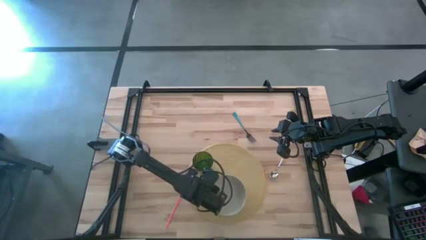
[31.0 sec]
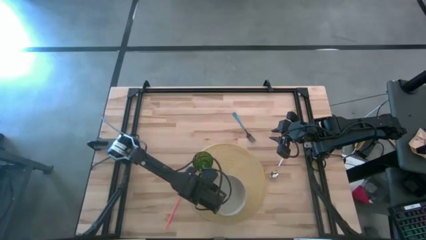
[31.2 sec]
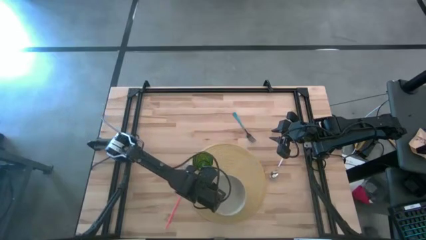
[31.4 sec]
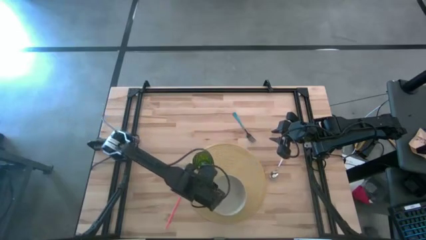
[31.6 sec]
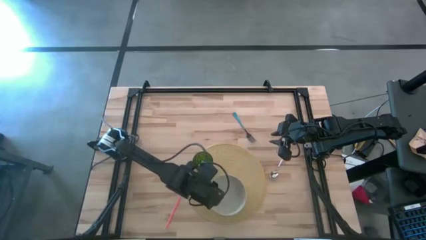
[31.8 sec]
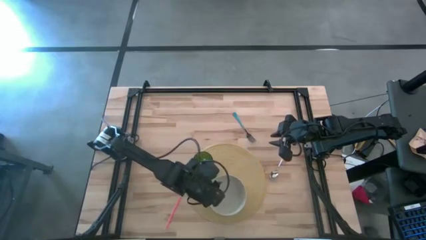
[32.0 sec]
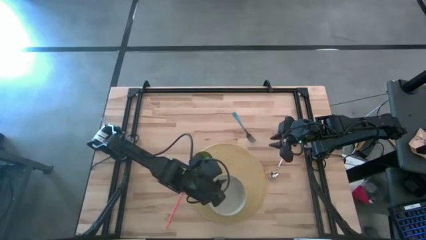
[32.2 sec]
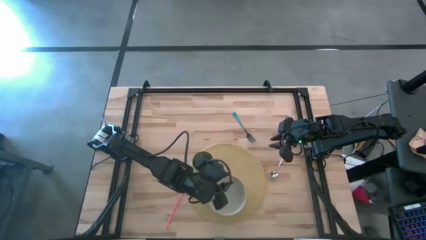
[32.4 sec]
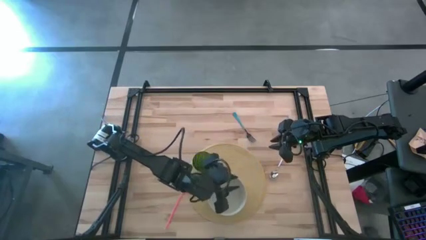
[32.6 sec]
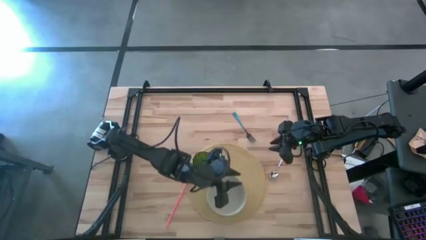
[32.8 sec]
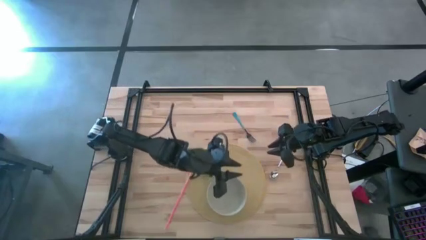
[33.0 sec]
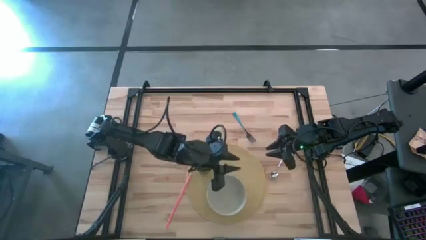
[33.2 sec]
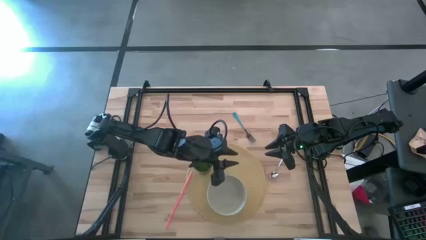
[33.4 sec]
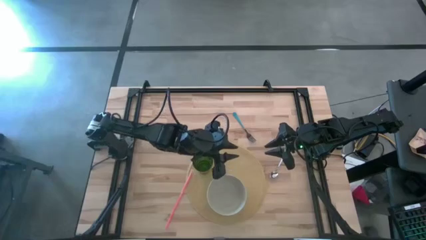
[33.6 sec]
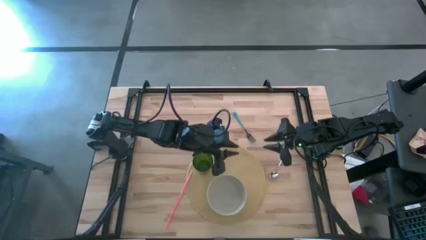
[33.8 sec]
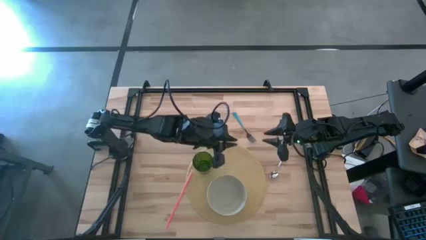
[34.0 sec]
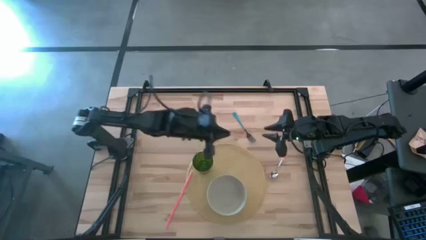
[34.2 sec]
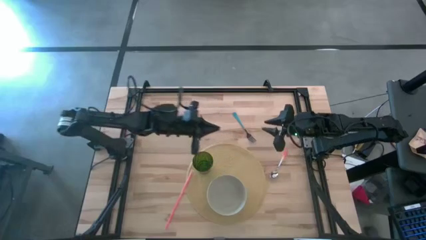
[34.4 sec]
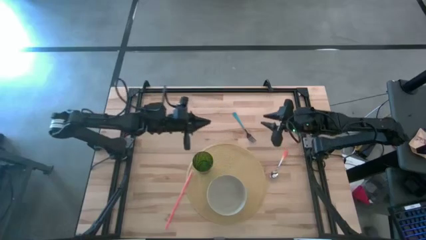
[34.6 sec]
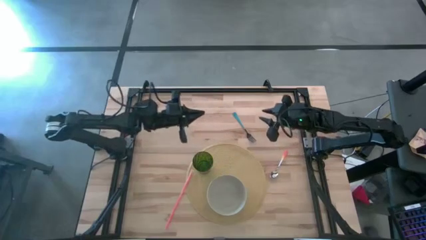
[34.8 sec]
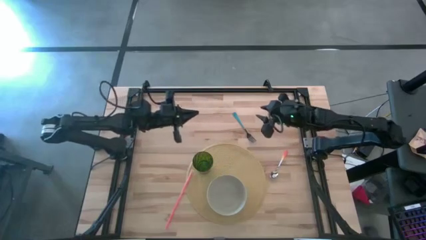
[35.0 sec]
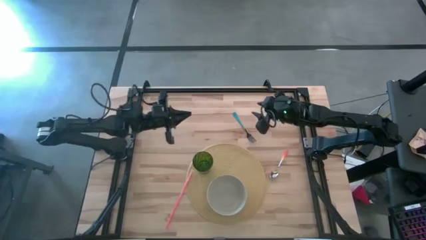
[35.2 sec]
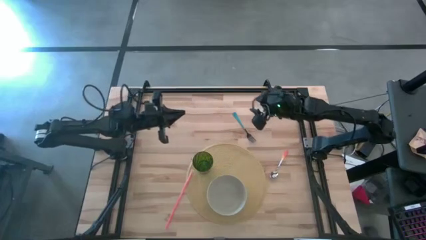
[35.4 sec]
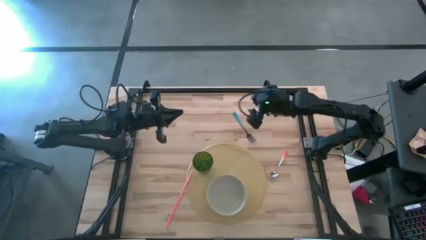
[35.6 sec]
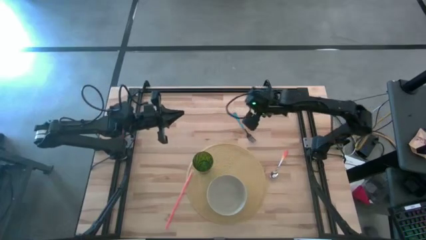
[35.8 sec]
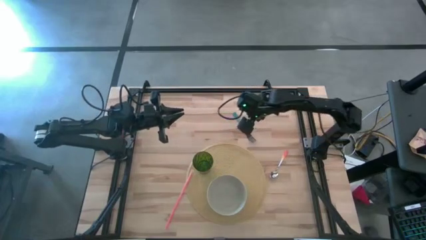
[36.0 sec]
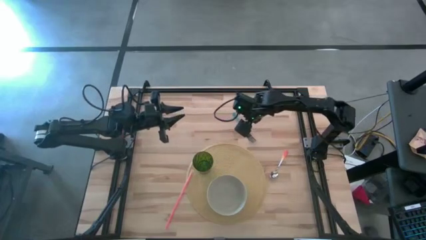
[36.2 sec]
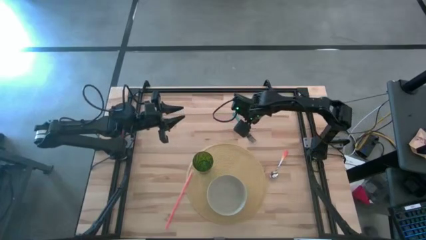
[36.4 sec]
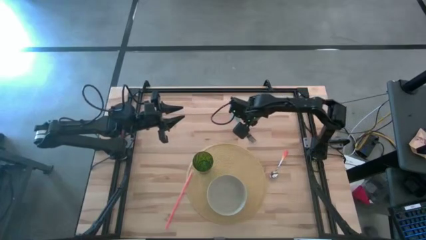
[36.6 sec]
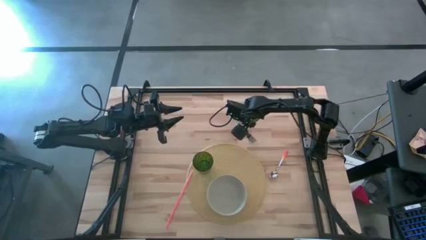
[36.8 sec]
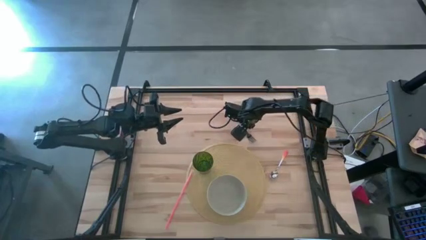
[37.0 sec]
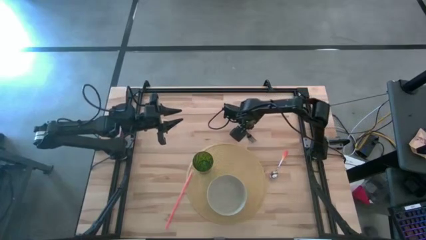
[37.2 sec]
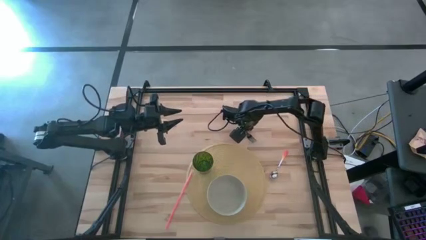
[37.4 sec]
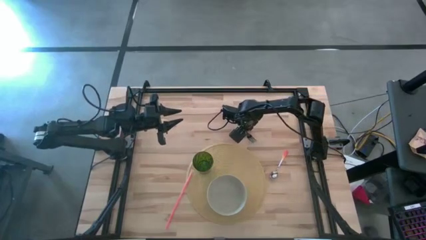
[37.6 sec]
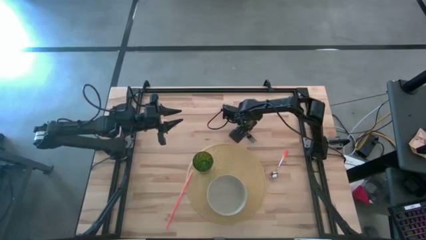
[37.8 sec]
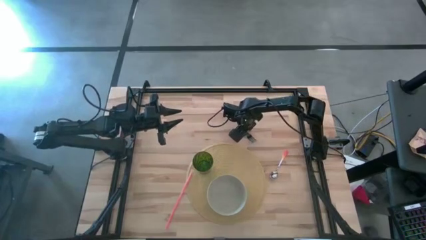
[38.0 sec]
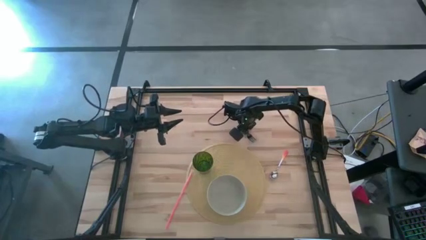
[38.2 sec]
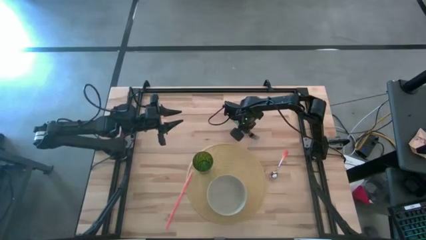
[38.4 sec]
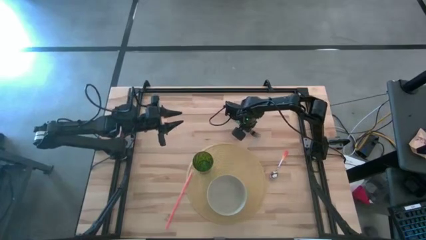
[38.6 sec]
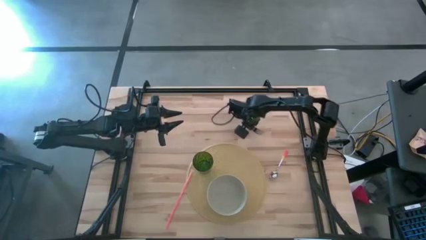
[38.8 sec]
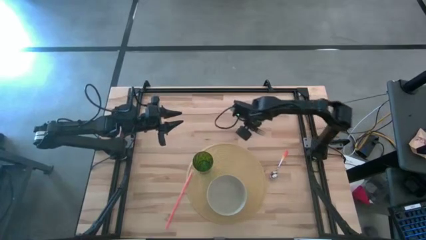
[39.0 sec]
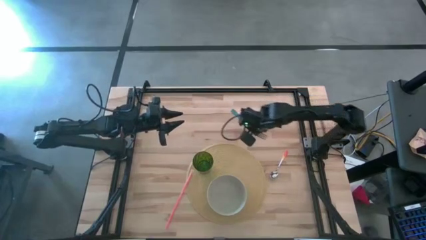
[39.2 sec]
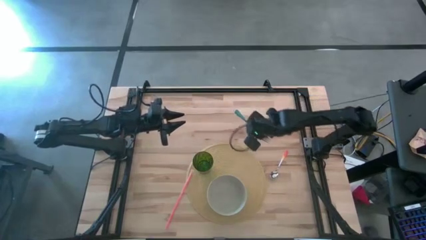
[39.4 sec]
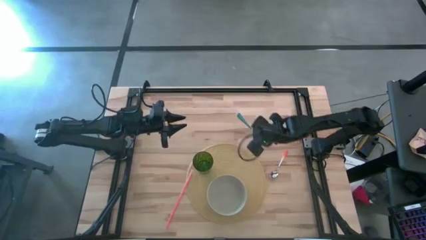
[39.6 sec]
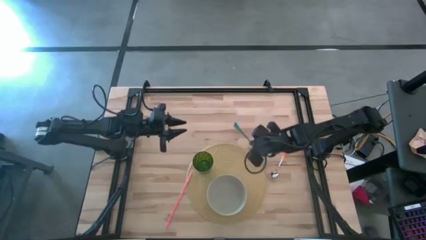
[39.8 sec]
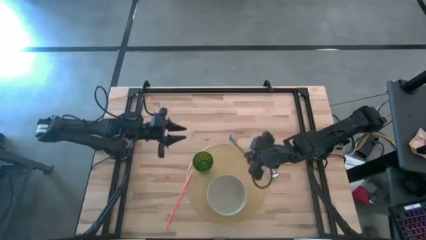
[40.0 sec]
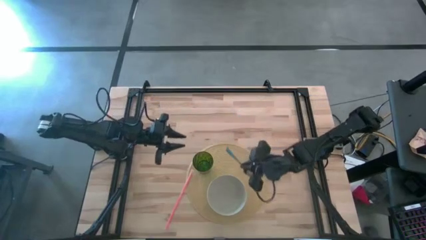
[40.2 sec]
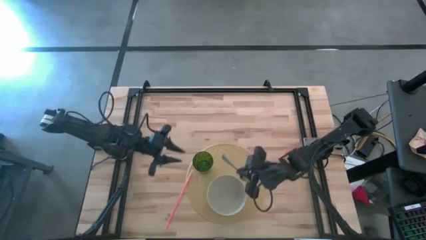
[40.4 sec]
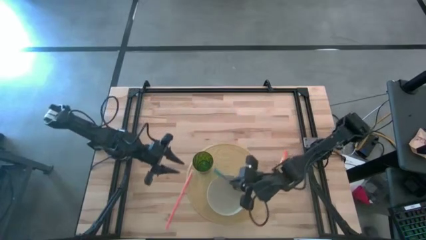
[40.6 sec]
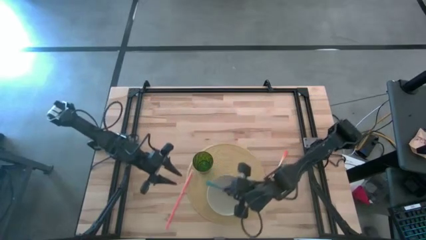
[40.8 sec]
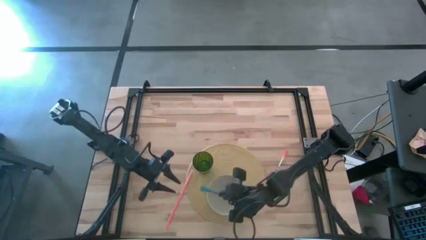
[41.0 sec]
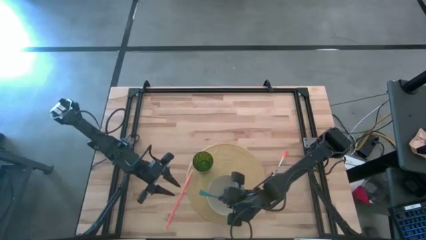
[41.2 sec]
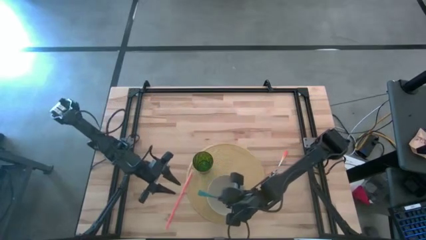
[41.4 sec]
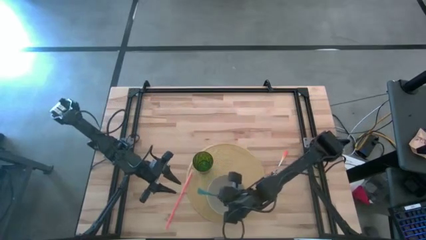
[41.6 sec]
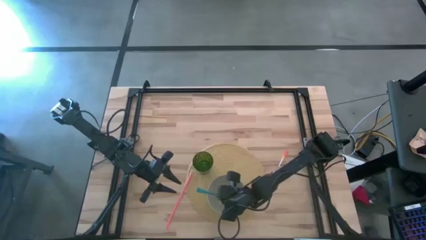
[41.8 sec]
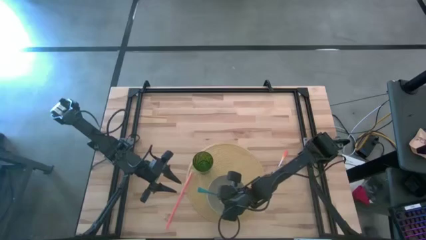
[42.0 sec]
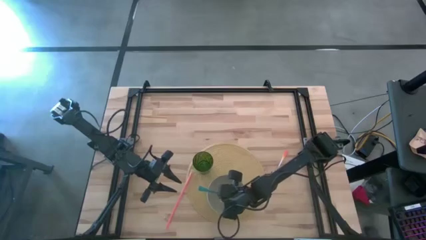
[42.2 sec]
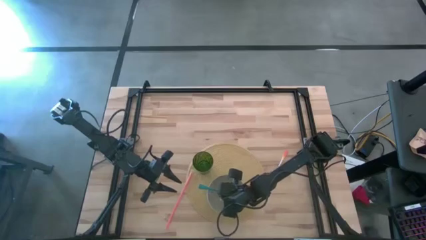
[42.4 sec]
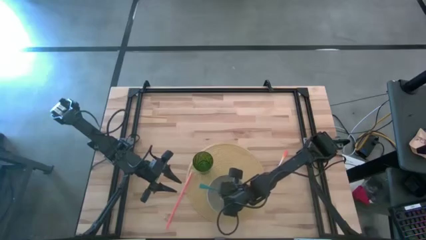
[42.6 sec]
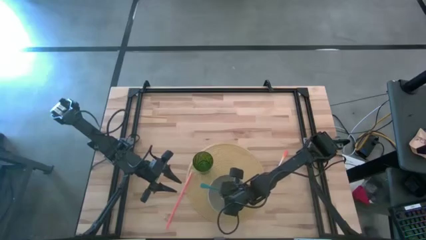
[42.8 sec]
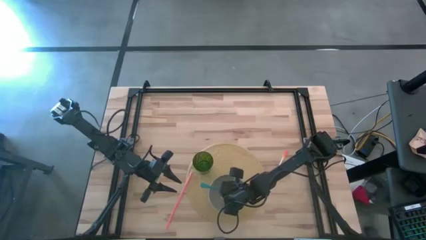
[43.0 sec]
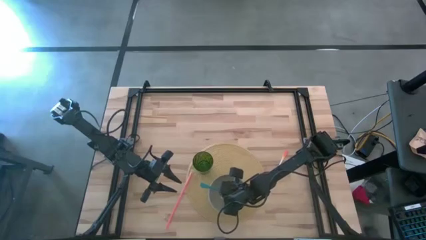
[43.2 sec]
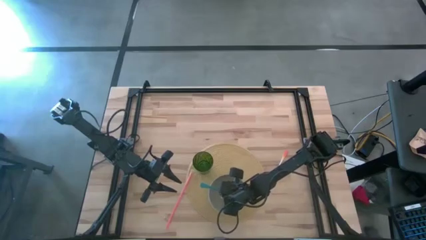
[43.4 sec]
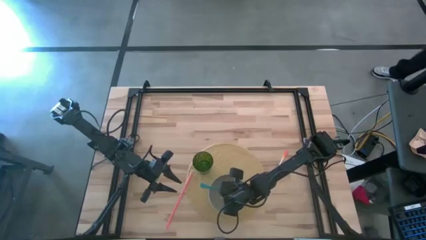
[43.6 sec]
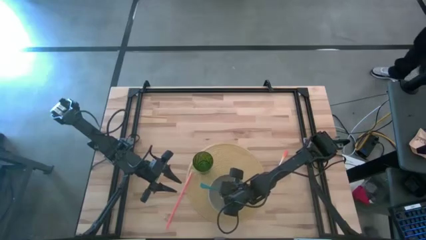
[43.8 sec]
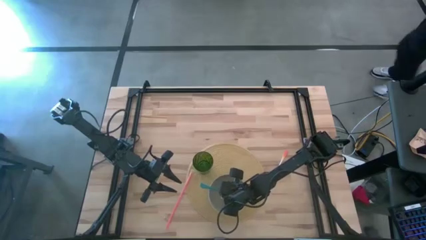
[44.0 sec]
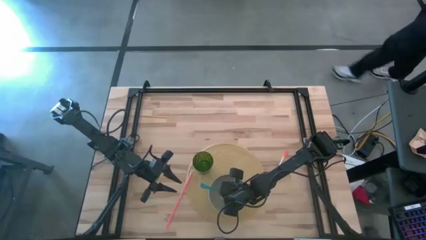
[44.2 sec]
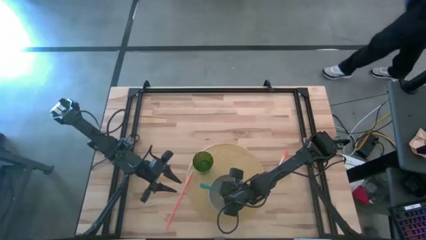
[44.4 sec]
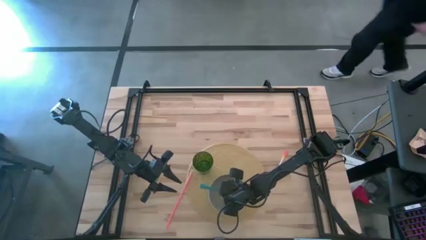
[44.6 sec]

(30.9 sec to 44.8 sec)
Task: Pick & Place Utensil
Put the blue fork into the white bowl on the brown mat
